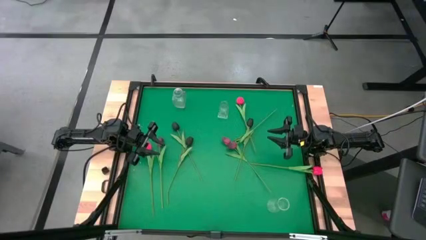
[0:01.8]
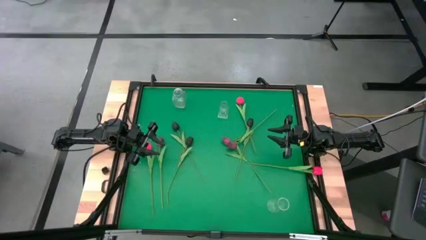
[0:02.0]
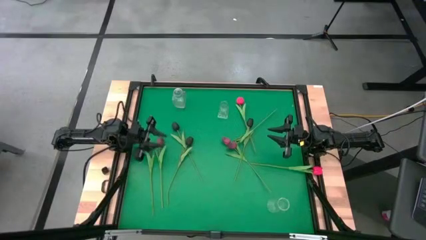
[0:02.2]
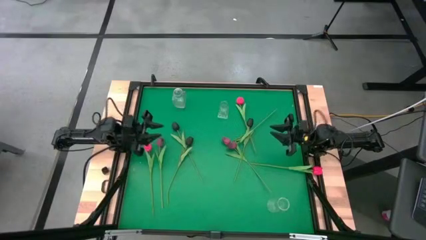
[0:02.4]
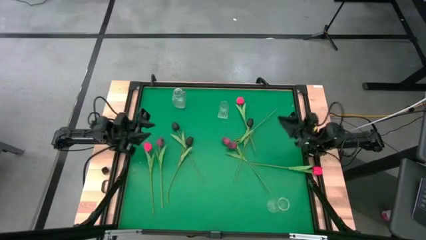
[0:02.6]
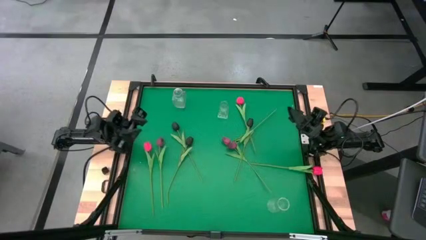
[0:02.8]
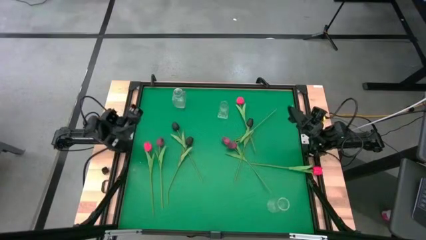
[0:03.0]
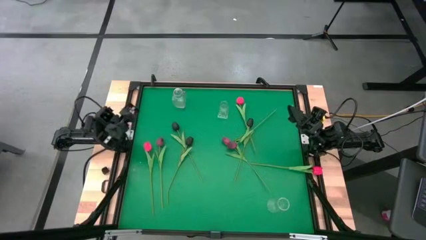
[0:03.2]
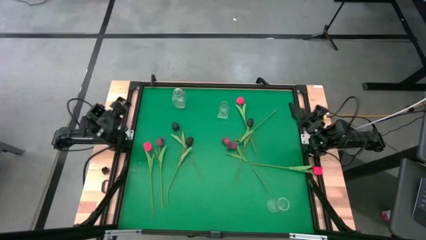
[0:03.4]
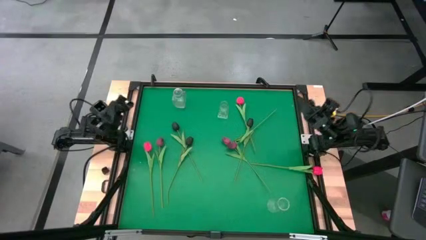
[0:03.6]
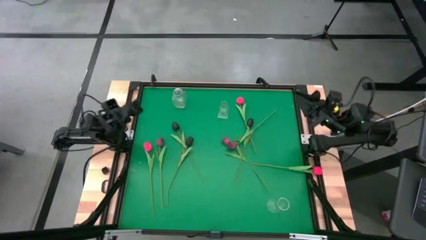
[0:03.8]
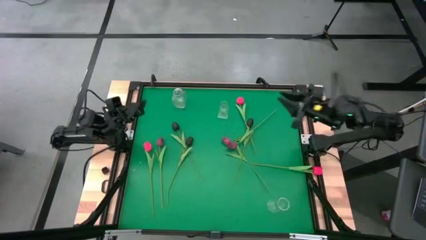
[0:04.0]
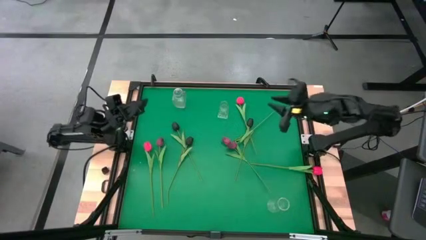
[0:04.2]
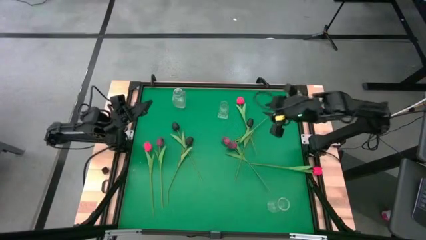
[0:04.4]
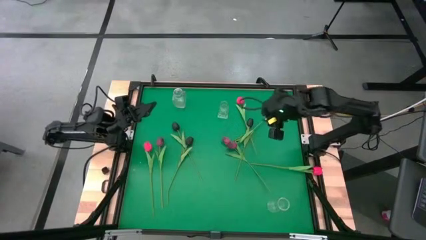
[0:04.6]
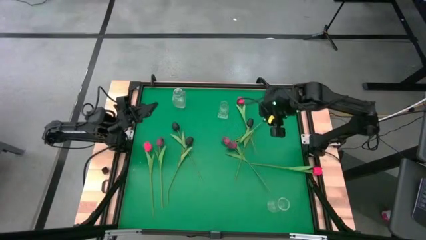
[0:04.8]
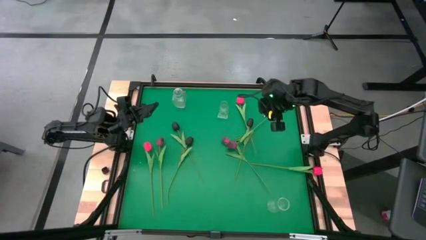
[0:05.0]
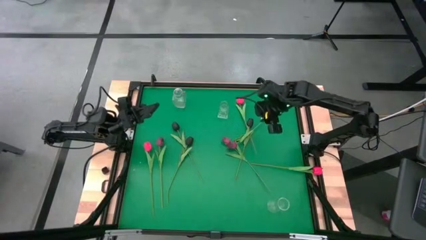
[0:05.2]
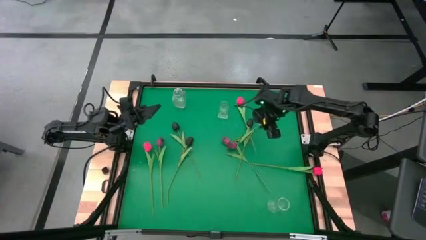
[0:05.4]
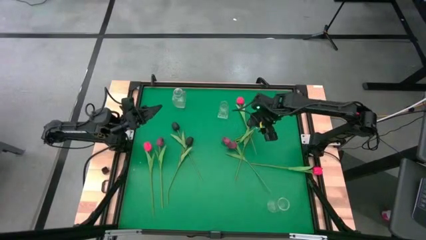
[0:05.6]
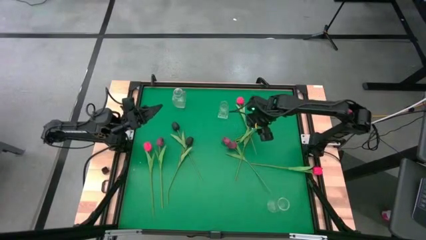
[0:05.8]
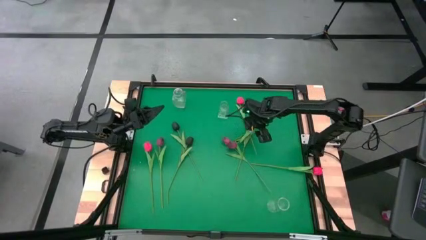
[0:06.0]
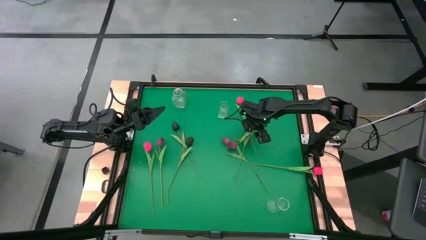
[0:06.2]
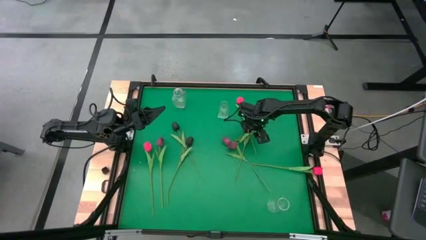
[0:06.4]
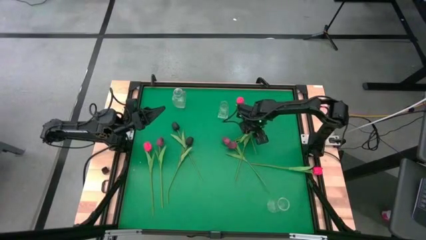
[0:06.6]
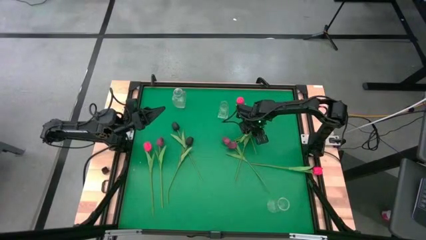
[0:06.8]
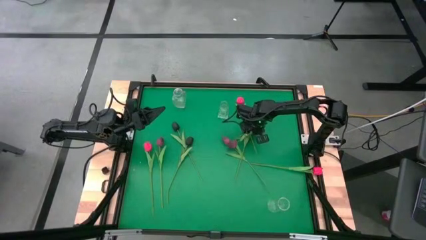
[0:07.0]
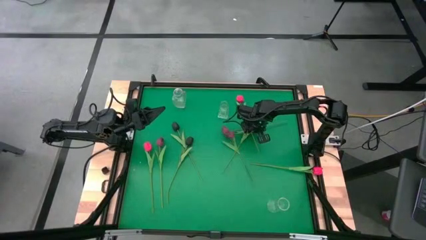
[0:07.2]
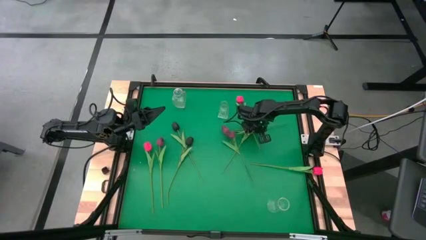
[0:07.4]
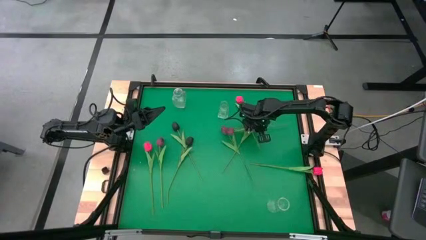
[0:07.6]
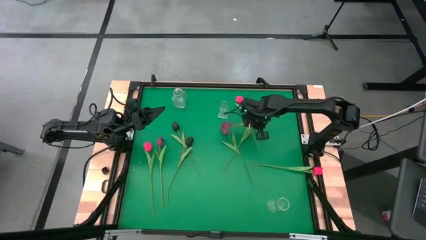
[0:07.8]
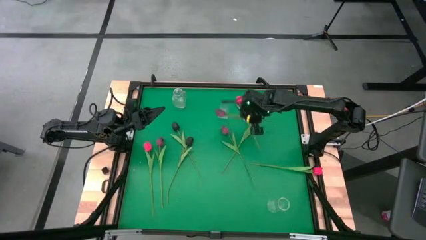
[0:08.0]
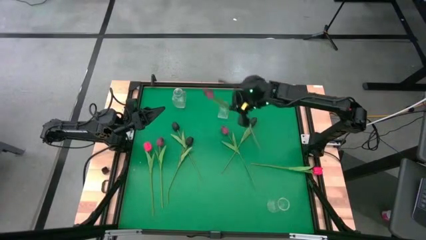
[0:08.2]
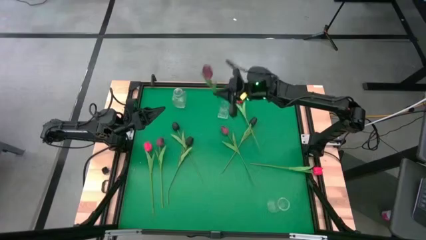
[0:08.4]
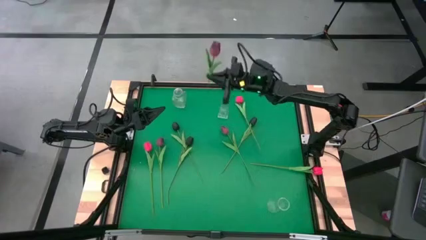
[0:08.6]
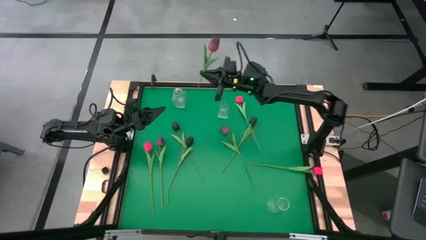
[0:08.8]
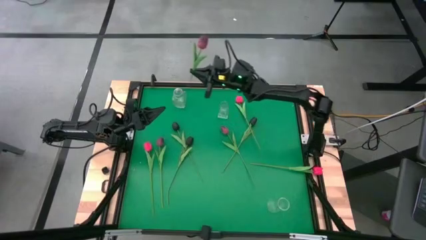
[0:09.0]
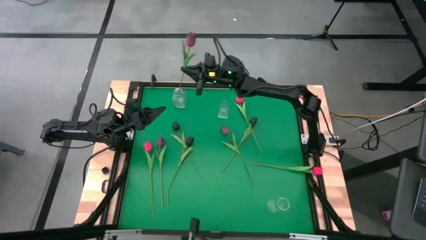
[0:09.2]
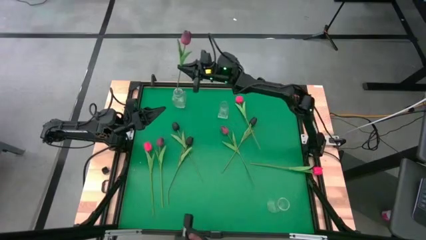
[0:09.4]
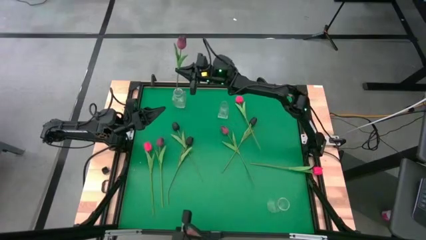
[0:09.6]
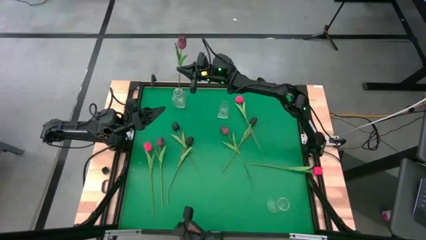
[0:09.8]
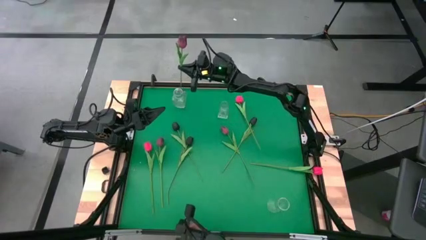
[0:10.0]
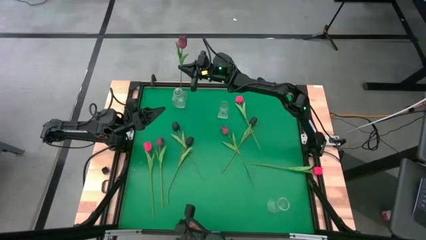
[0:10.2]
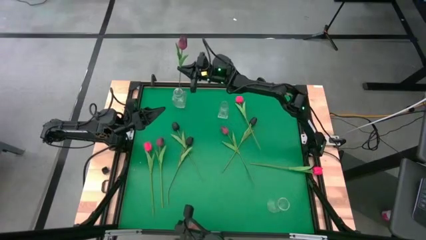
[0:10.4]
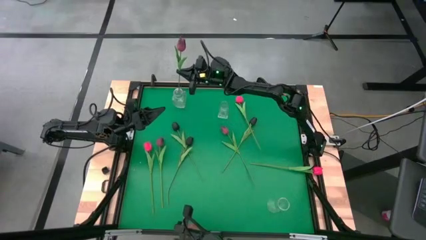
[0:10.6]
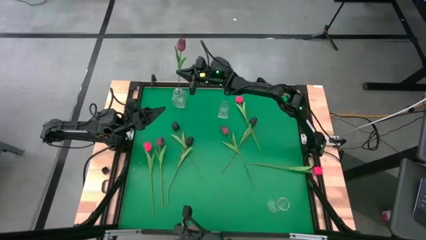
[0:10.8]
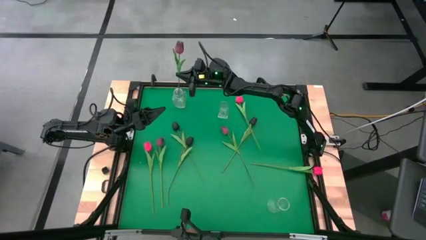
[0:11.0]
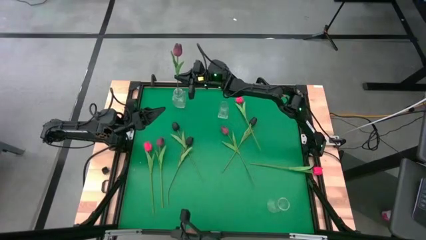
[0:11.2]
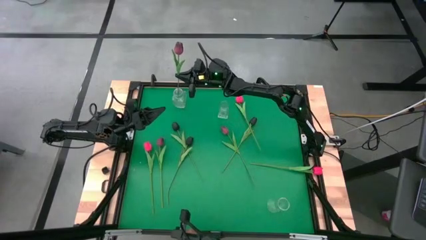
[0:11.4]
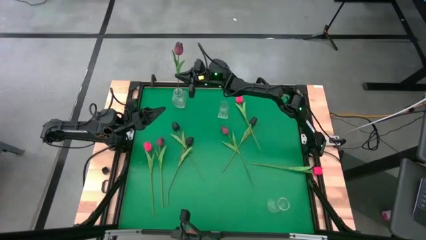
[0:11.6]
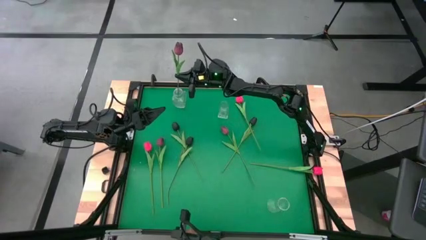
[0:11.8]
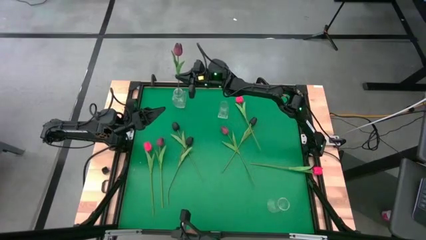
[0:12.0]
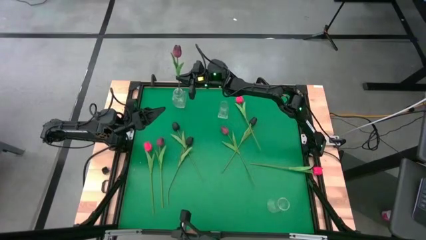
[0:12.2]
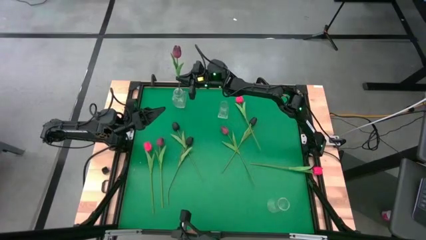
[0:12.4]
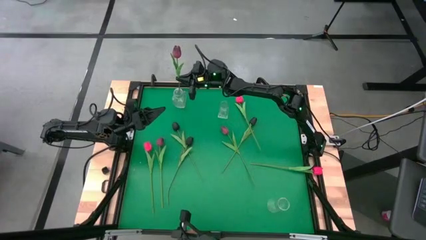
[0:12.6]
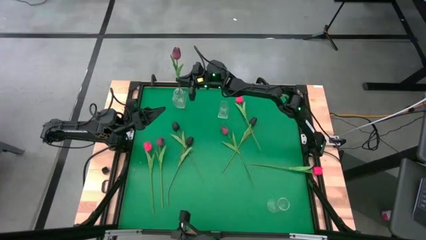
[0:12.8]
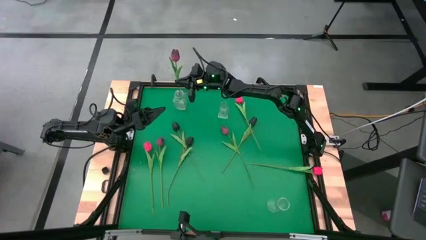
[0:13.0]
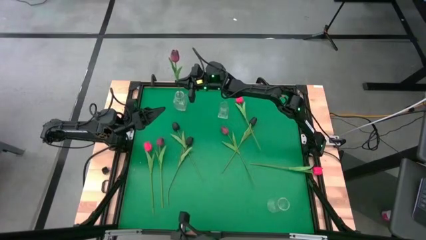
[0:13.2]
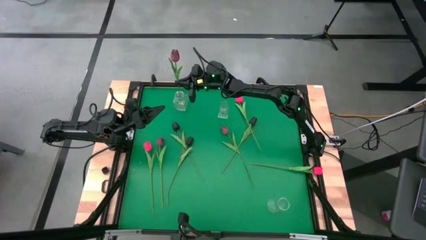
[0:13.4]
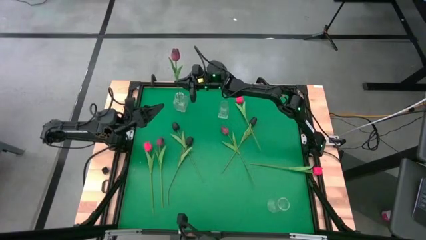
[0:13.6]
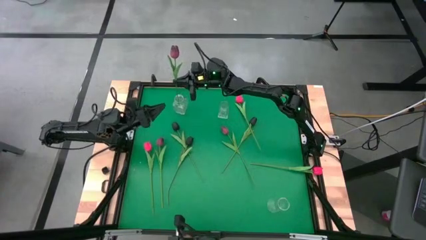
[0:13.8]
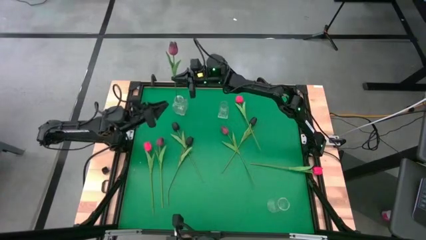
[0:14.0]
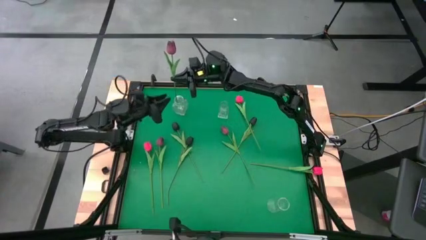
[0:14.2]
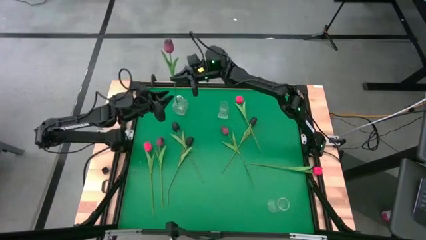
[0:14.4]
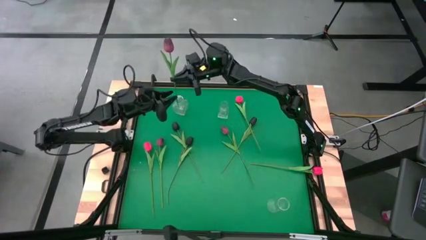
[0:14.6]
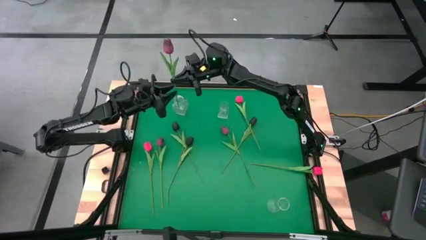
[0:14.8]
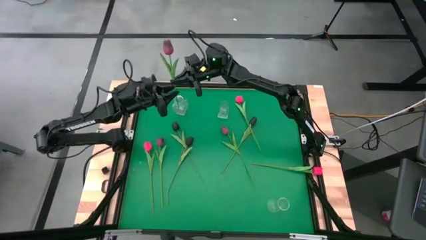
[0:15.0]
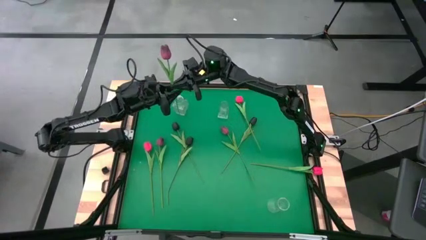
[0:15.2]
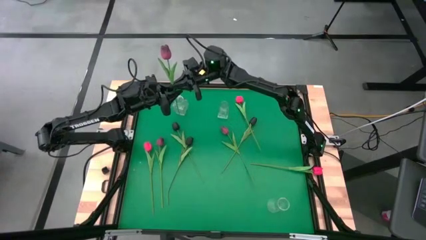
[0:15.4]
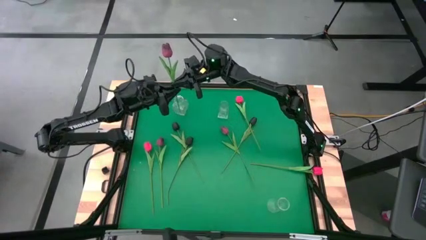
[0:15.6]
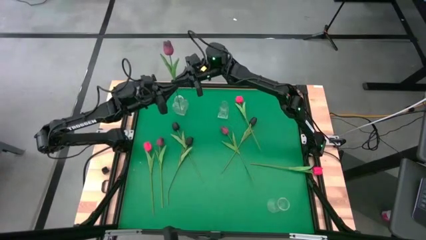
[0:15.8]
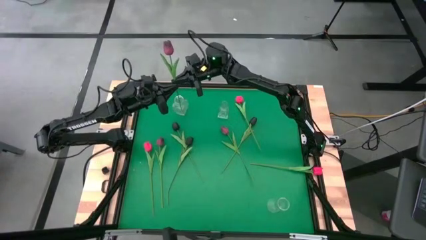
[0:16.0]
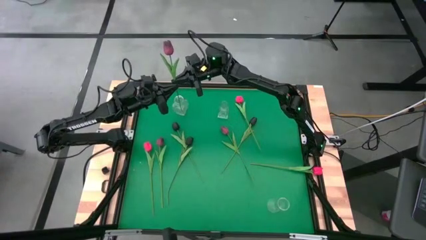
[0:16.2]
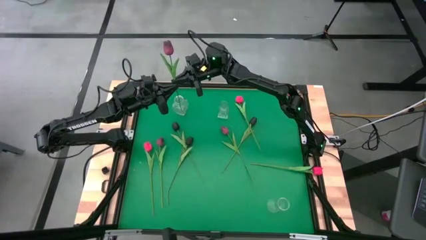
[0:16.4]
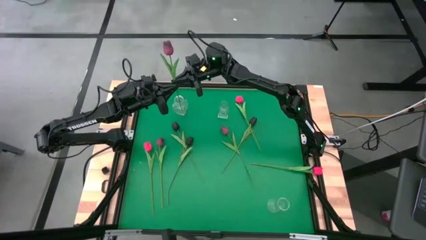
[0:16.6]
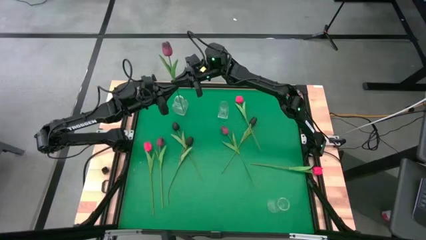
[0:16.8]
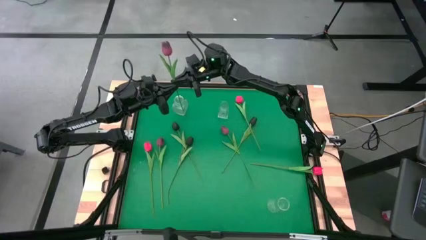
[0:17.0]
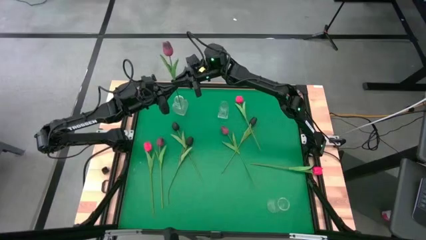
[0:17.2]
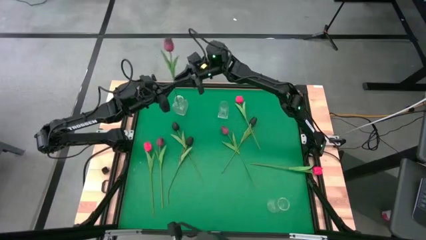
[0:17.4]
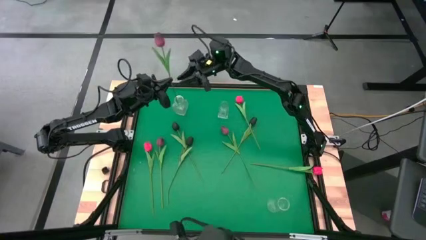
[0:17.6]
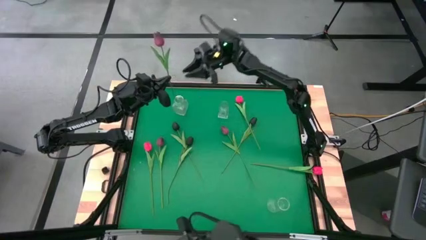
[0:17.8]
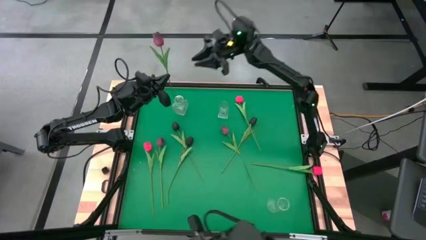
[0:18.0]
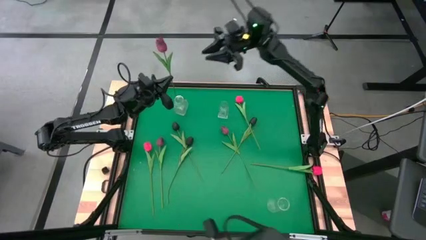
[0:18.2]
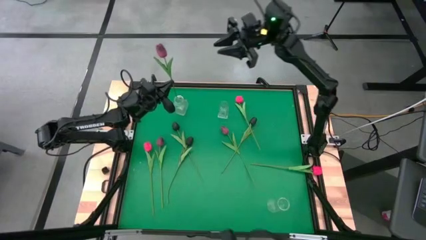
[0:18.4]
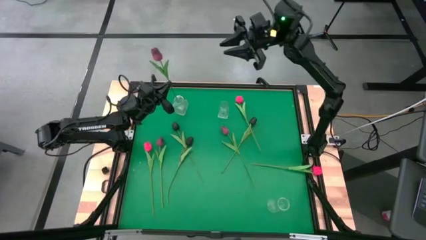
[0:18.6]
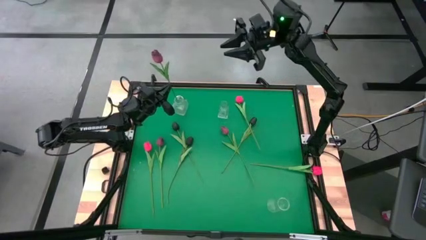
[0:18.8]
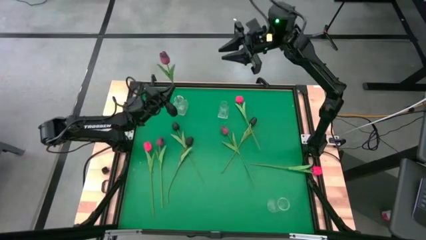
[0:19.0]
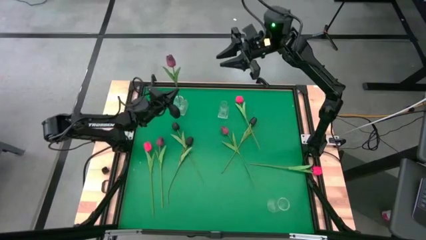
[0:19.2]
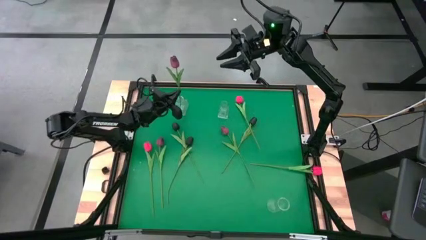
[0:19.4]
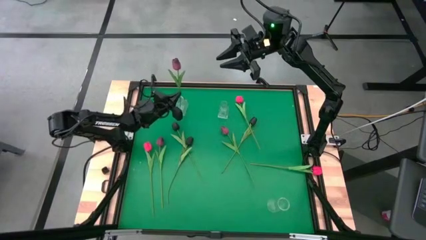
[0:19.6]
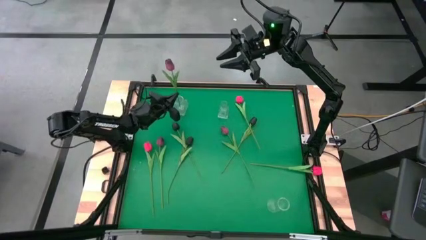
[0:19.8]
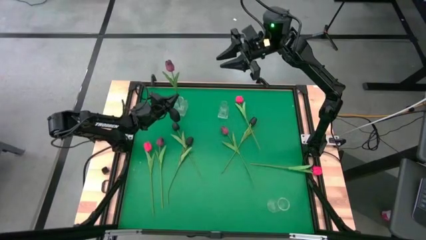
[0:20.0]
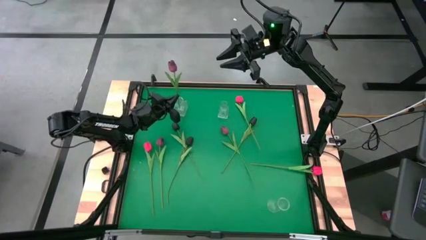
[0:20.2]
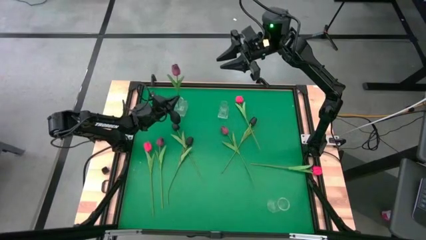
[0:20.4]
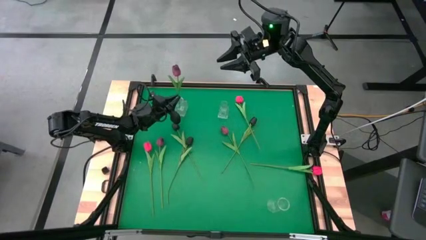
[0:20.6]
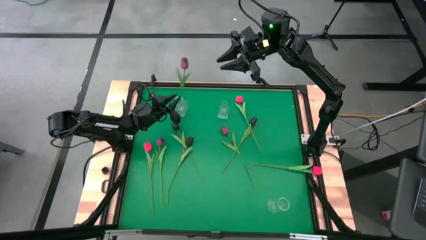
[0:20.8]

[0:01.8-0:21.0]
Task: Sort flowers into vase by color
Put the right dark red tulip into the top left transparent vase
